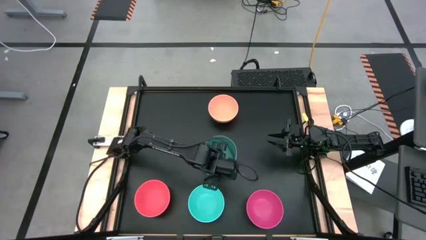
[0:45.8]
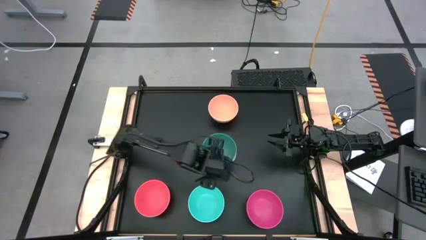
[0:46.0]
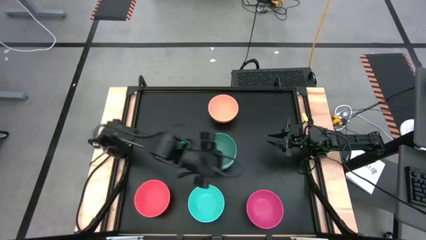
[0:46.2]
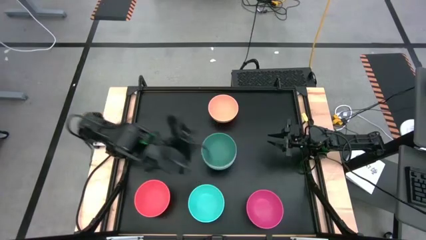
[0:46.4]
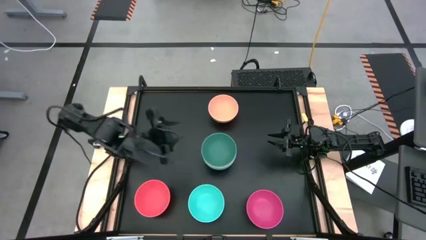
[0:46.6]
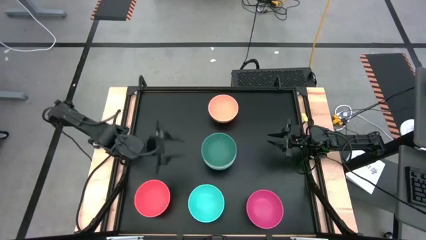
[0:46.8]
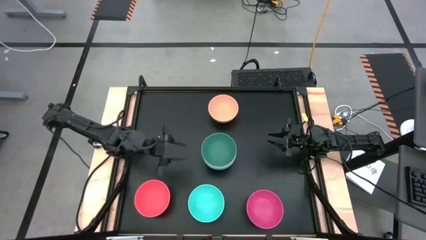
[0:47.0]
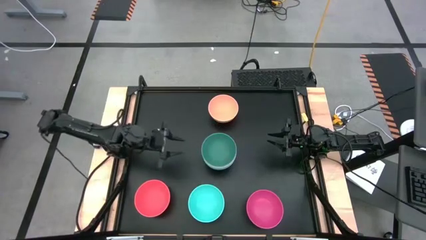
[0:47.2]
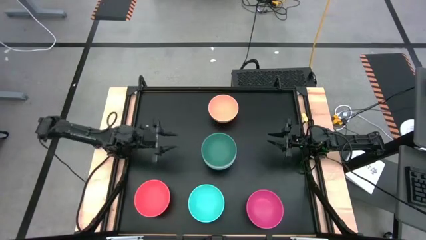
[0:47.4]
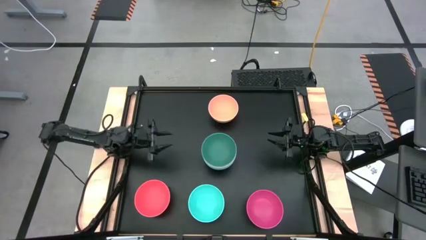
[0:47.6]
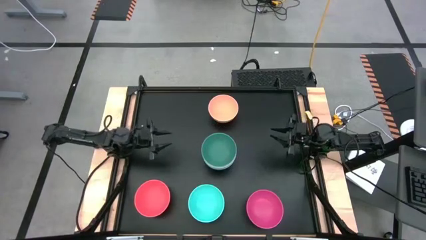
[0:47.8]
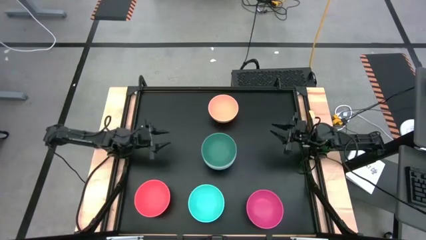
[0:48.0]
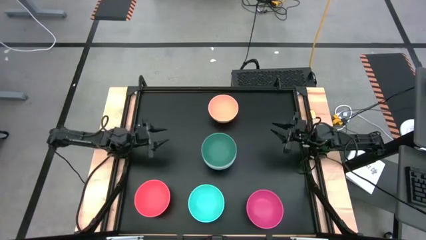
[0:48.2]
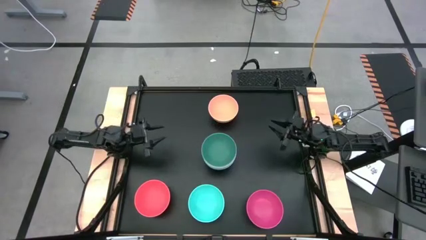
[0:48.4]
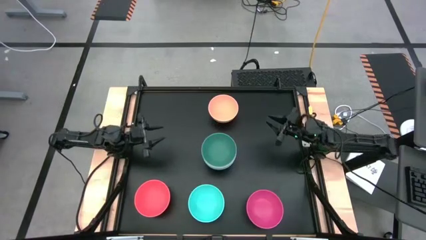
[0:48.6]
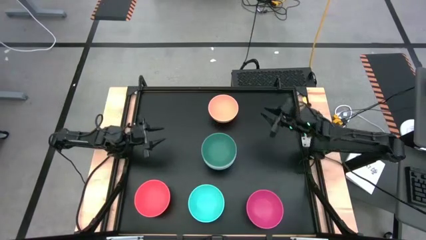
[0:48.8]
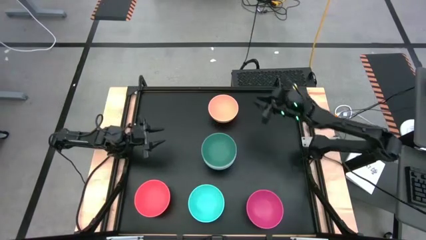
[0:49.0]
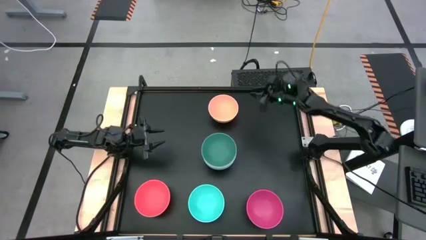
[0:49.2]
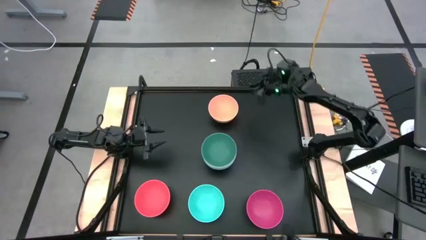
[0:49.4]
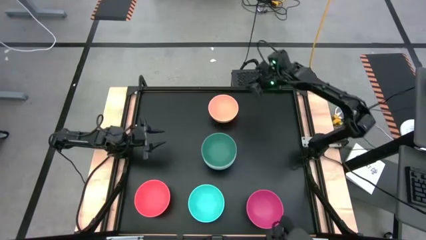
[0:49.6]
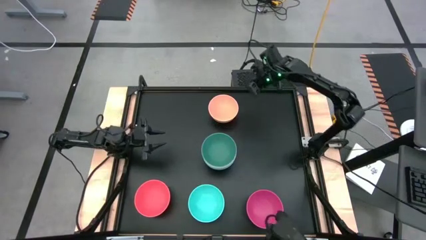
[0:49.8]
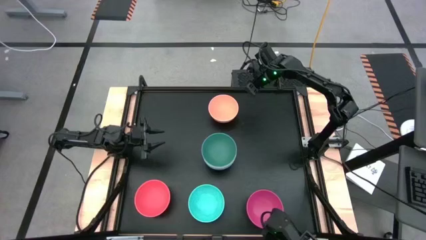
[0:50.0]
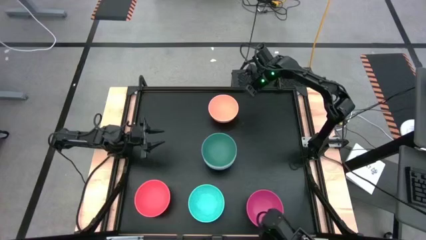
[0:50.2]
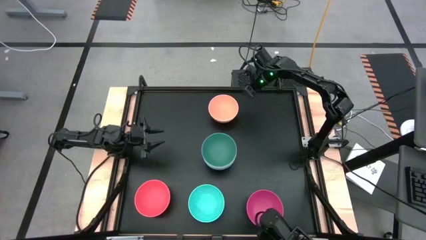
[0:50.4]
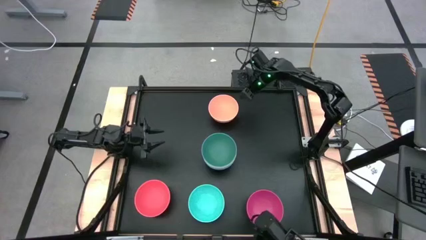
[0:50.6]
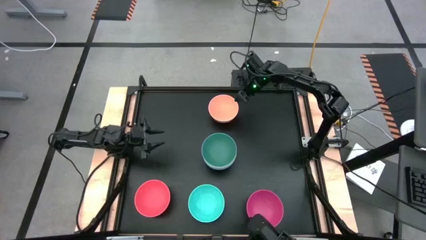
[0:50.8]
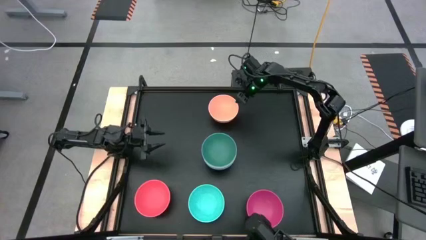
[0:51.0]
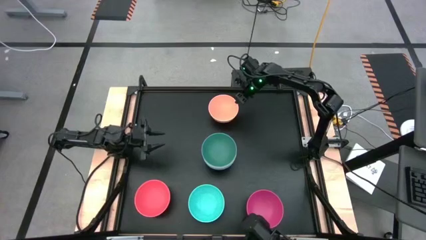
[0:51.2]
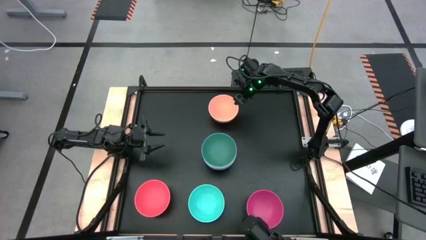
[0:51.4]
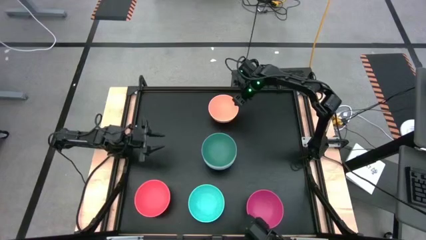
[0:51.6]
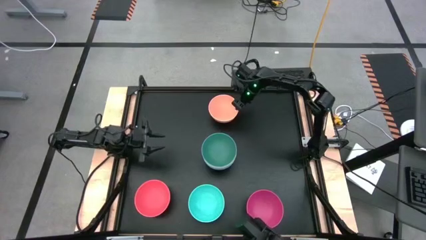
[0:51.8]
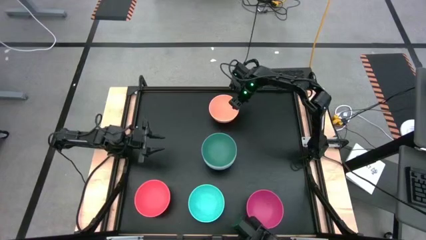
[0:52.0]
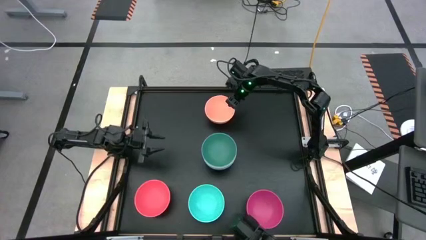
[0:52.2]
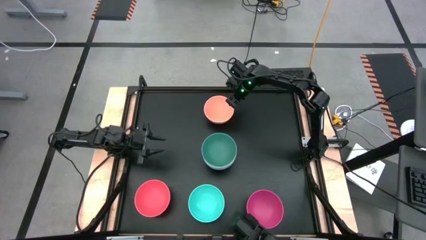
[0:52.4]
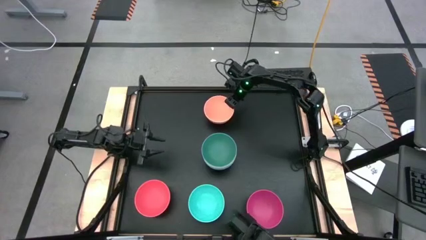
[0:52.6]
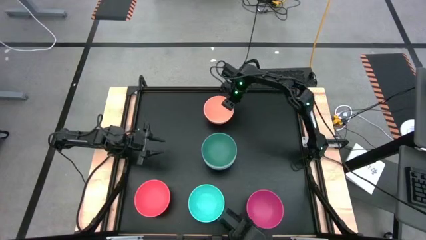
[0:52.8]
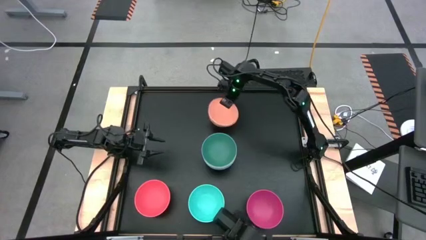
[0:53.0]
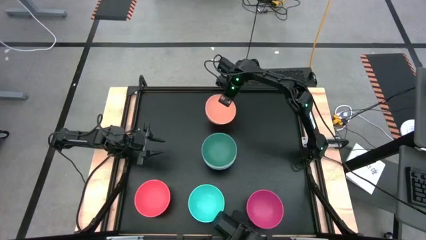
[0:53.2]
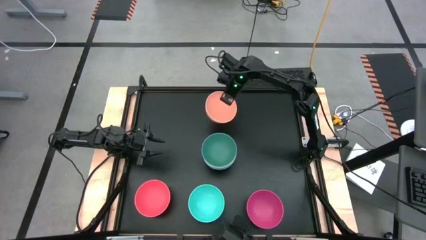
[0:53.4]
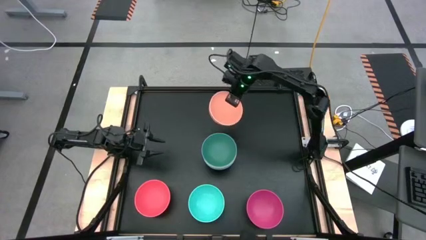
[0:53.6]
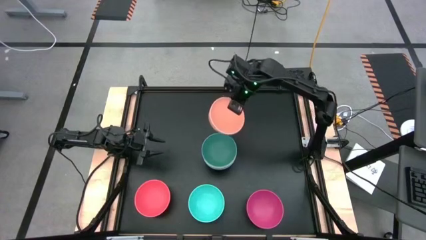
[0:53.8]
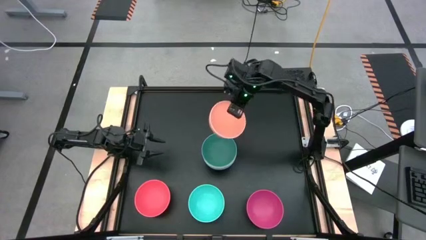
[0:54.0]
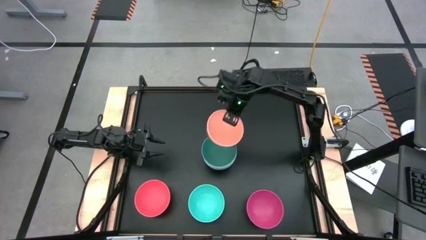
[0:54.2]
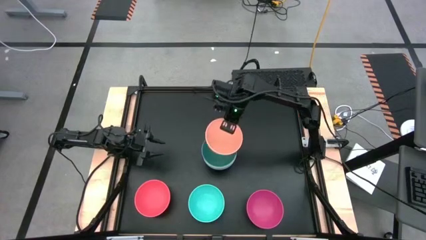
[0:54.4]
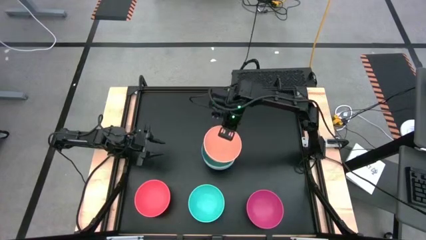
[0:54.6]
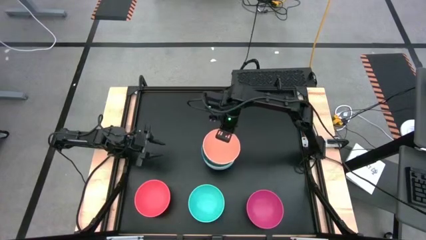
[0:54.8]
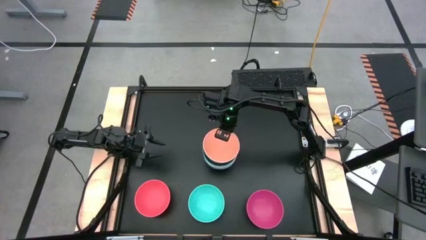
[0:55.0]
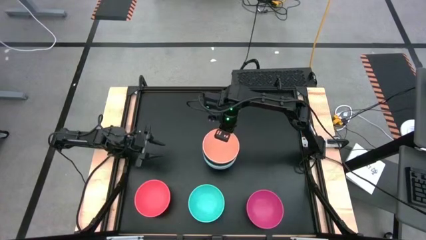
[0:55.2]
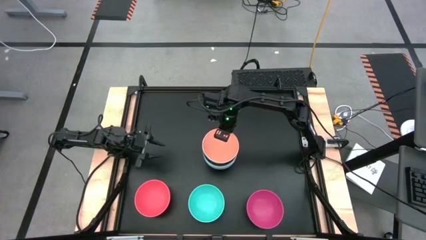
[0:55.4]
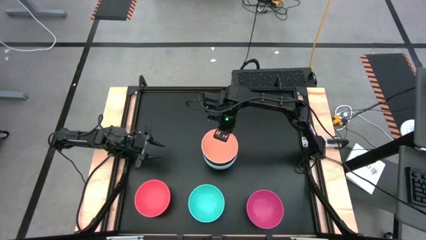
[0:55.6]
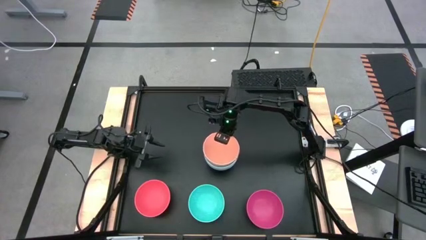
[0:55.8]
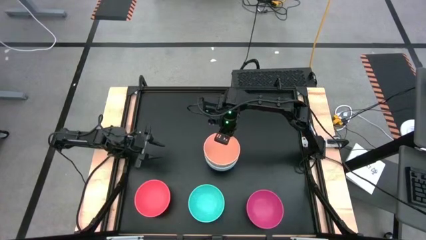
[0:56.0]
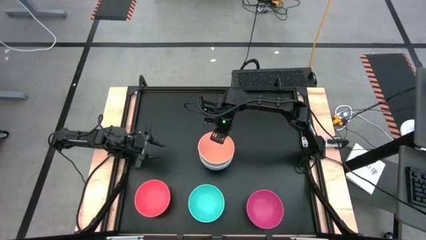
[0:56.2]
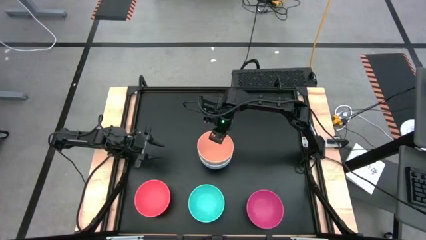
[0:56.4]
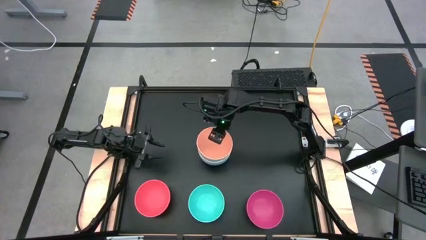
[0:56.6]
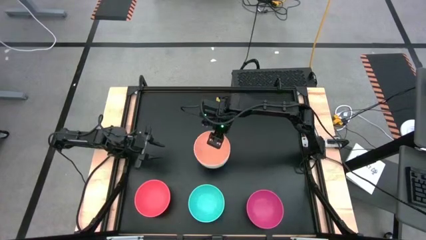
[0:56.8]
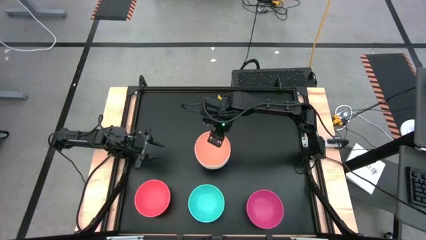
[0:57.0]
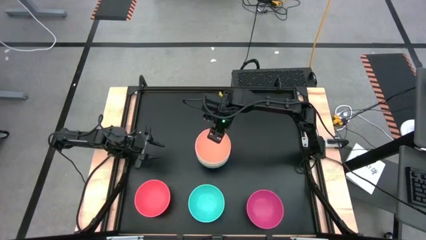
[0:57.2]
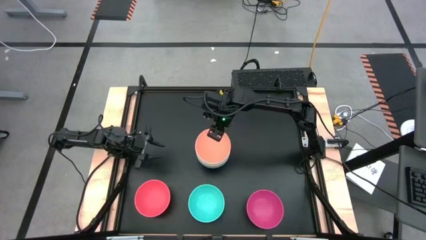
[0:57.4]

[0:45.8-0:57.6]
Task: Nest bowls inside each other
Stack the orange bowl on the green bowl

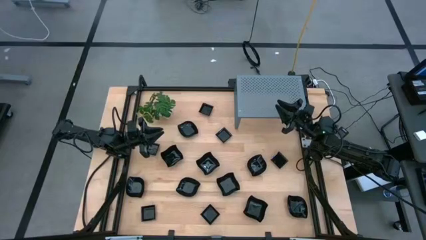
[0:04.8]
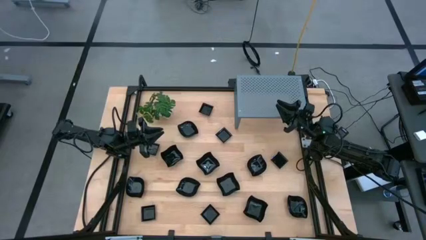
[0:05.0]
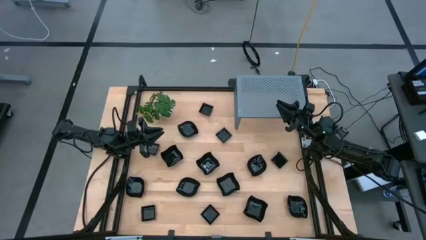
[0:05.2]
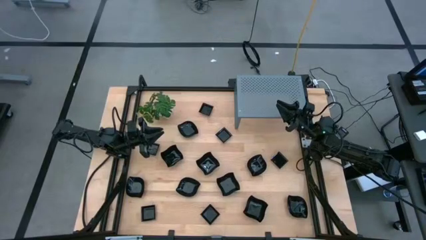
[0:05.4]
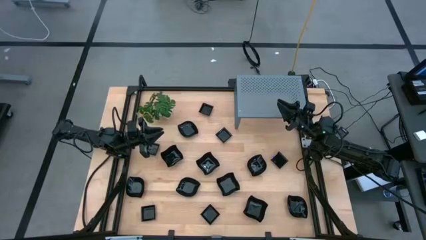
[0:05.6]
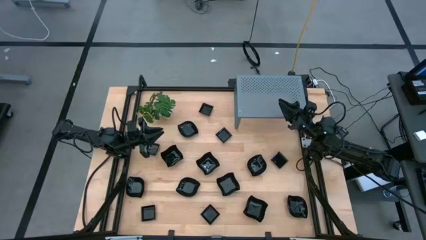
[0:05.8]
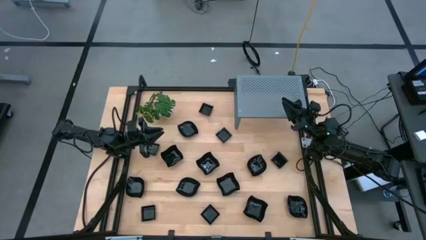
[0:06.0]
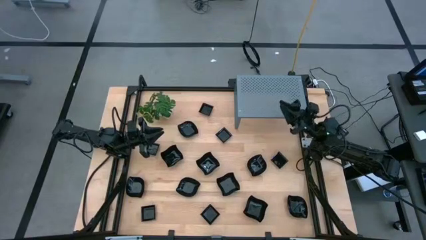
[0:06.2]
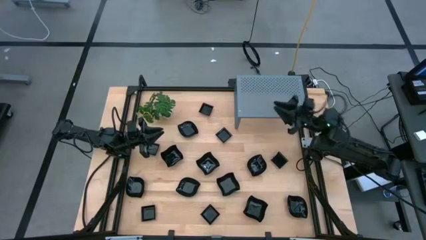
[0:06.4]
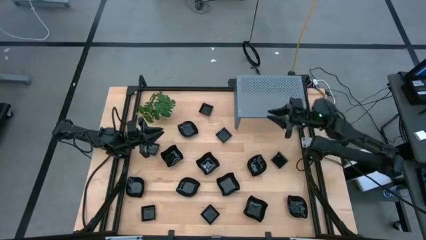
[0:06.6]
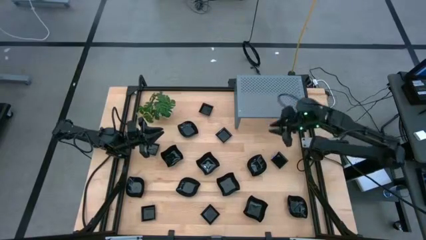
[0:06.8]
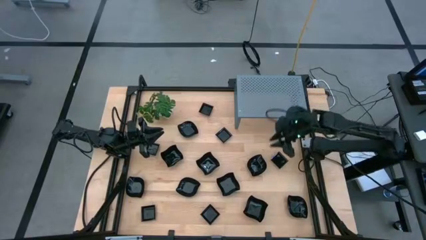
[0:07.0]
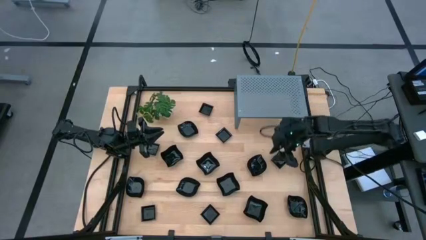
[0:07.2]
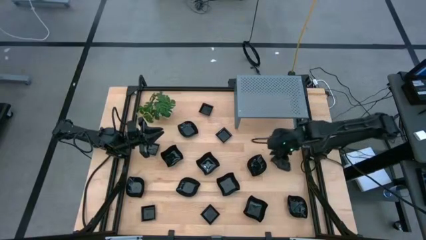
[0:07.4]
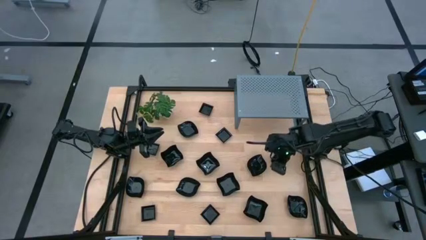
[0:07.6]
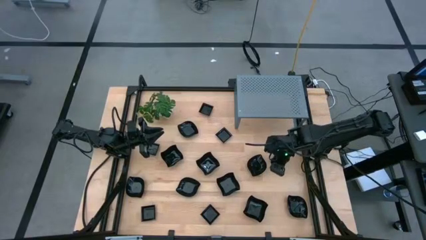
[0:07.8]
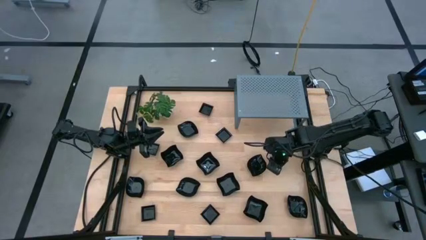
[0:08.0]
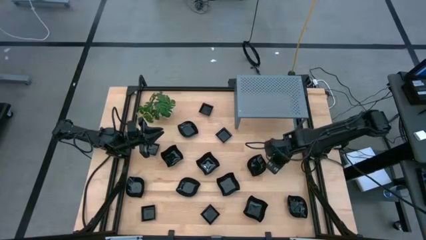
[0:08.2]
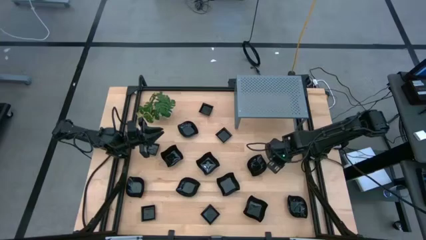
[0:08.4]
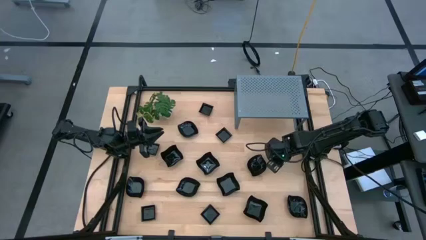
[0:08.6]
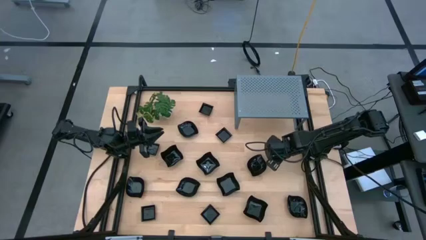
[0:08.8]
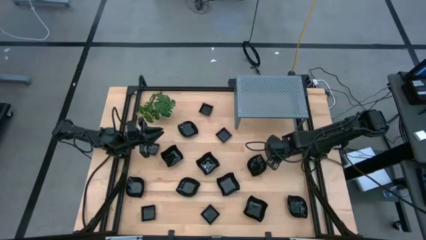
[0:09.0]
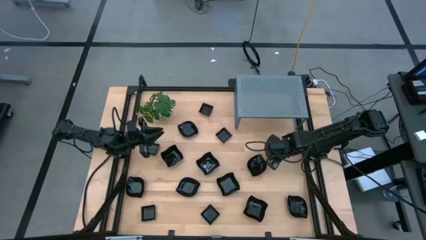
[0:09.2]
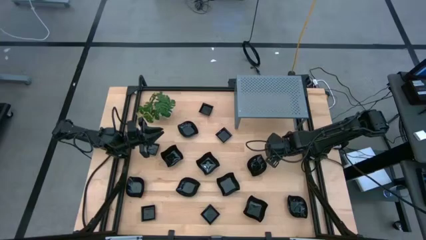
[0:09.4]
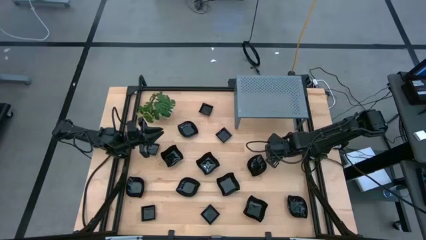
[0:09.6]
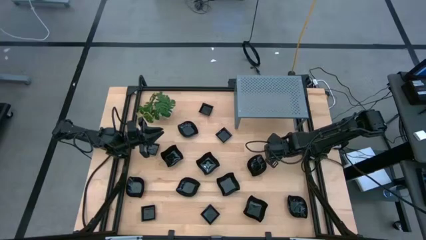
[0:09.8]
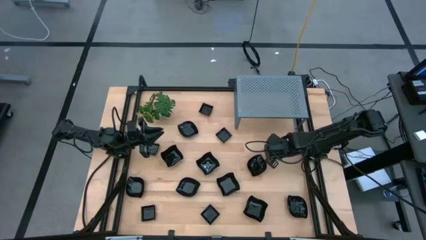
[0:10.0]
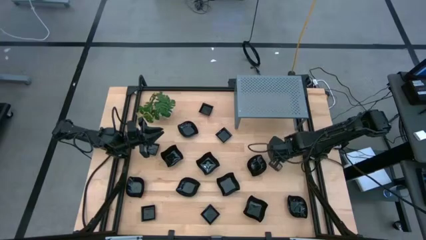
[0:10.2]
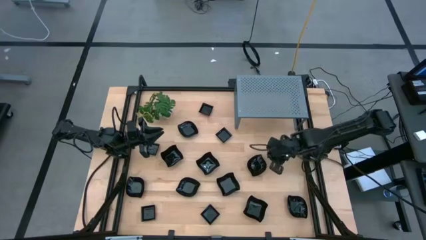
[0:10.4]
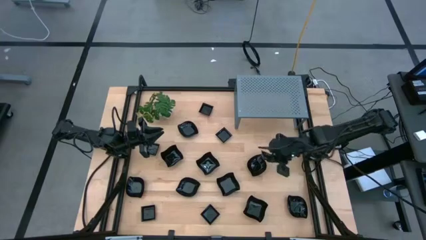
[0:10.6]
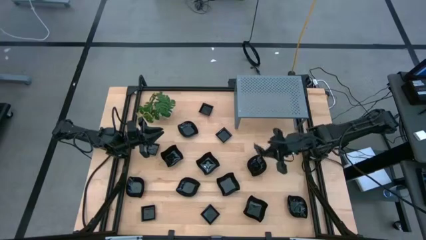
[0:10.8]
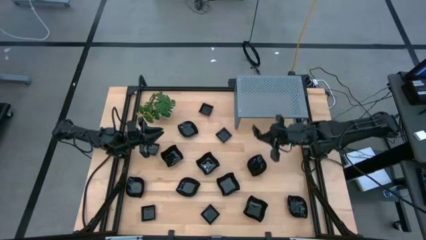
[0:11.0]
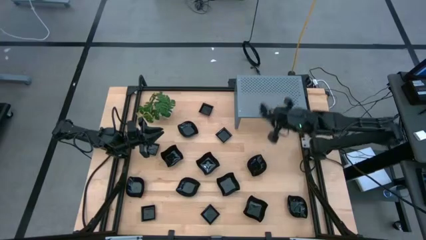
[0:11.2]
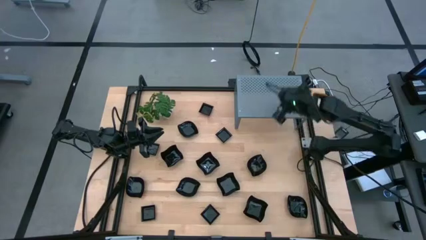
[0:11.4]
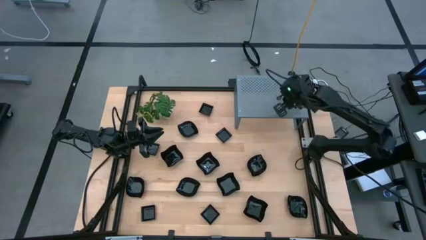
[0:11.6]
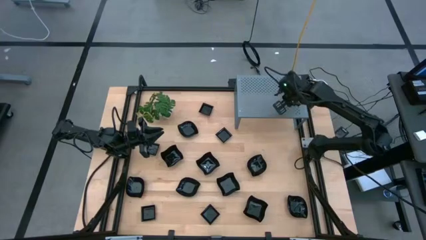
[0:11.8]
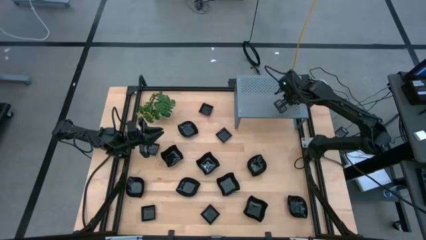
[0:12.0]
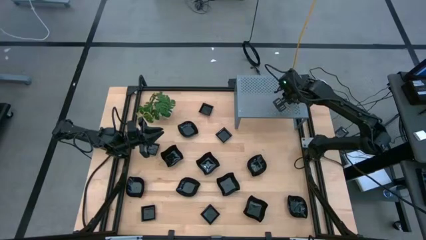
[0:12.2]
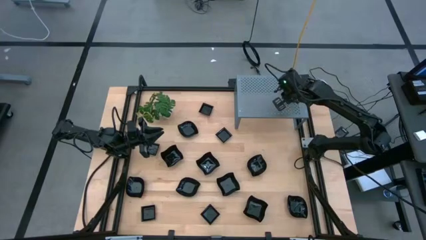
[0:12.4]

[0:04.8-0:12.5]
Task: Pick & Place Mini shaped plates
Put the square plate on the shelf
